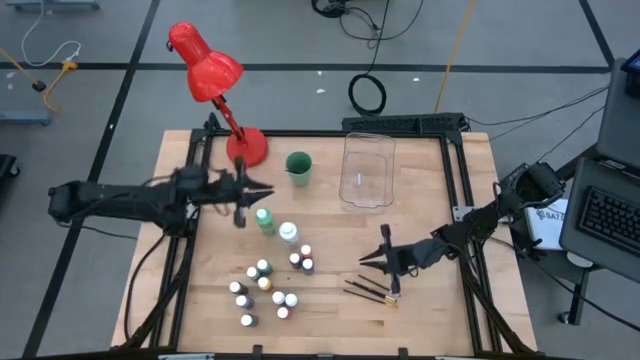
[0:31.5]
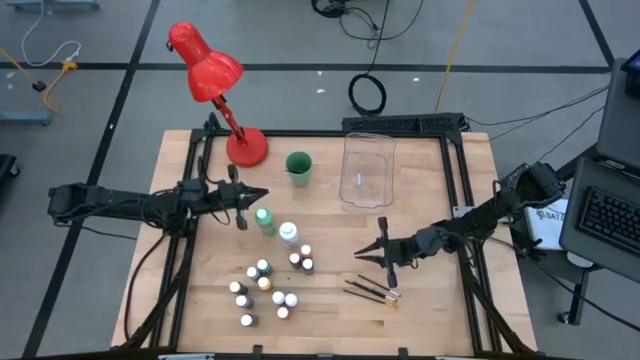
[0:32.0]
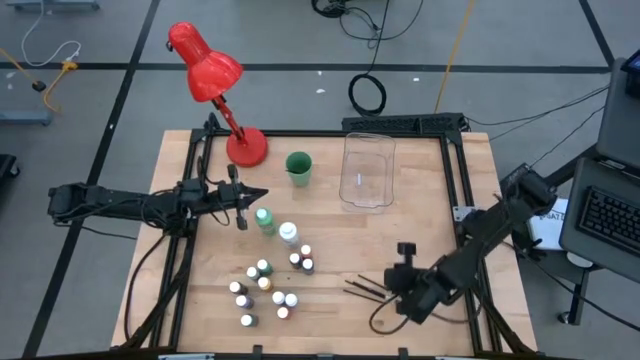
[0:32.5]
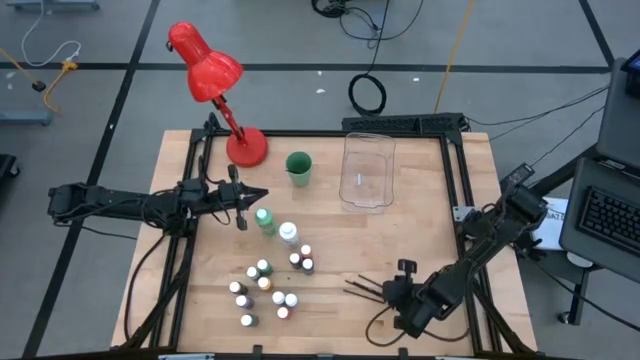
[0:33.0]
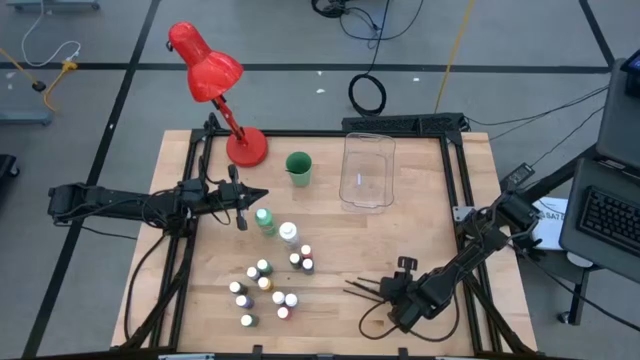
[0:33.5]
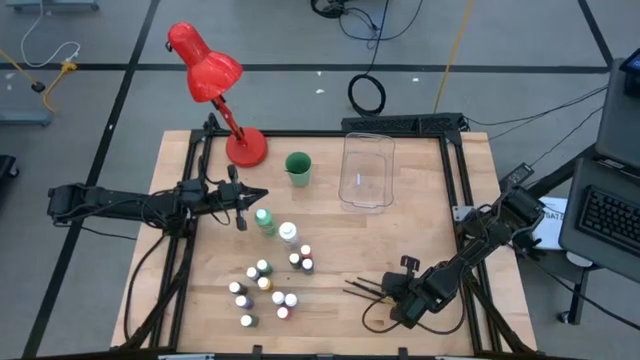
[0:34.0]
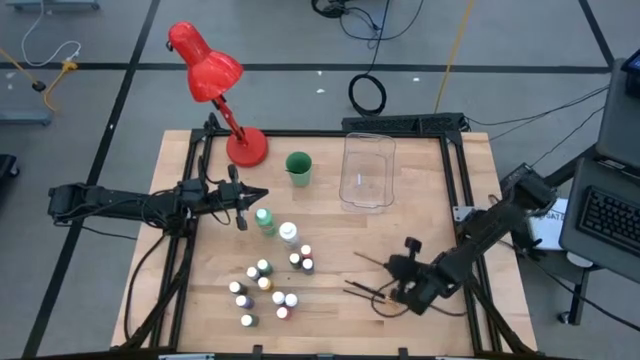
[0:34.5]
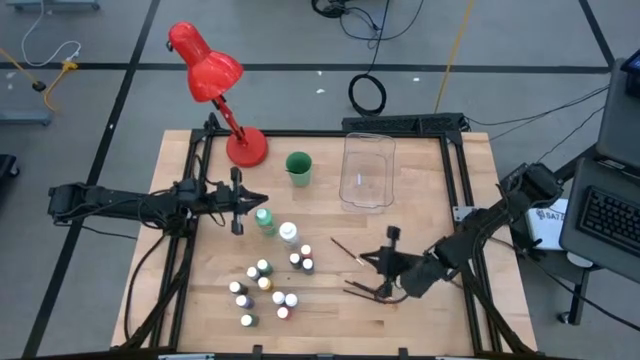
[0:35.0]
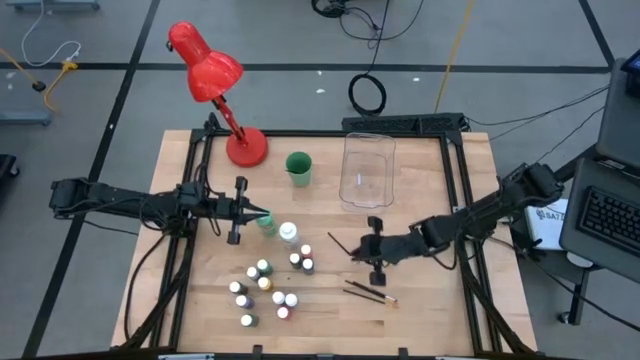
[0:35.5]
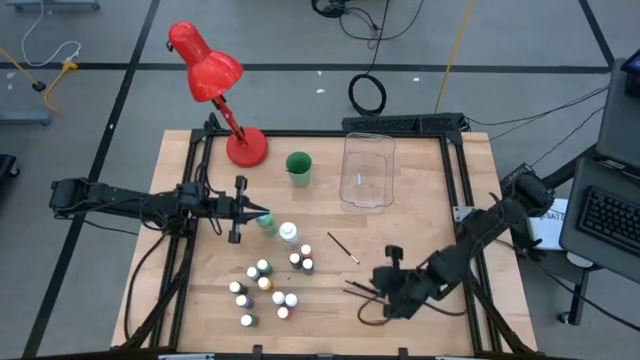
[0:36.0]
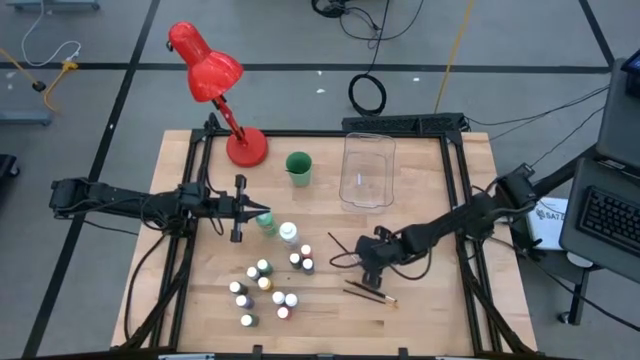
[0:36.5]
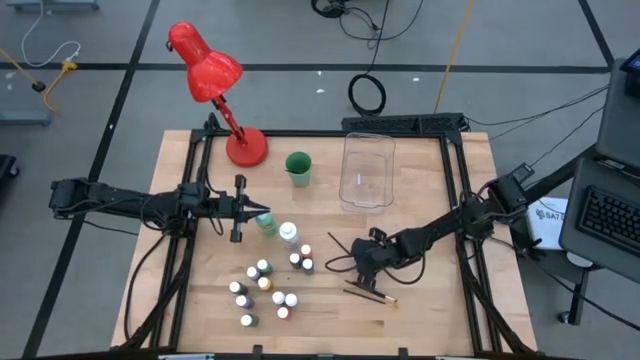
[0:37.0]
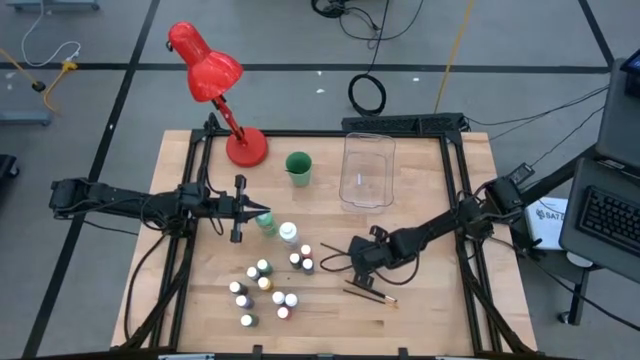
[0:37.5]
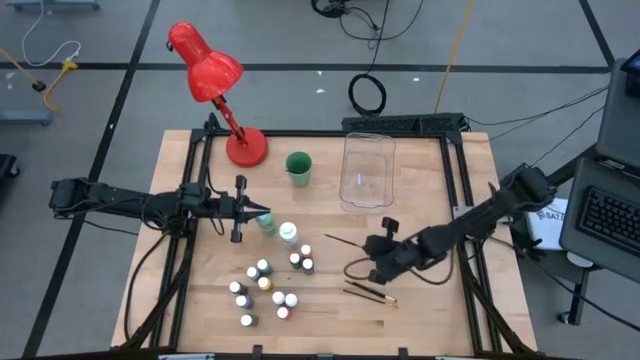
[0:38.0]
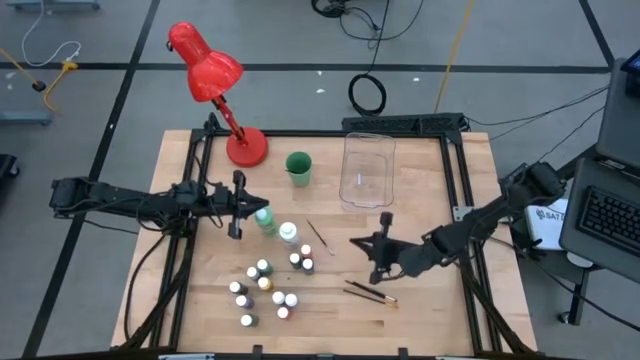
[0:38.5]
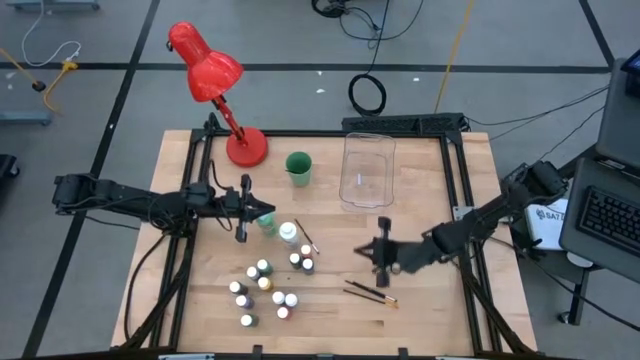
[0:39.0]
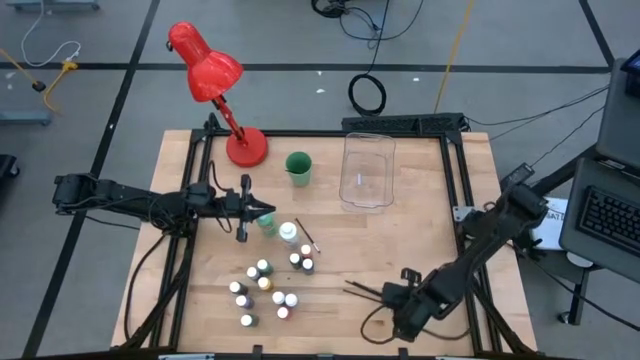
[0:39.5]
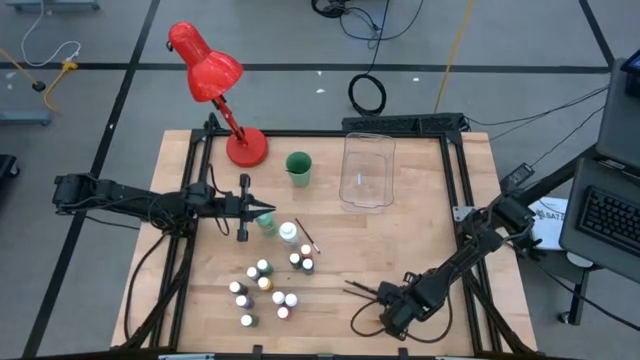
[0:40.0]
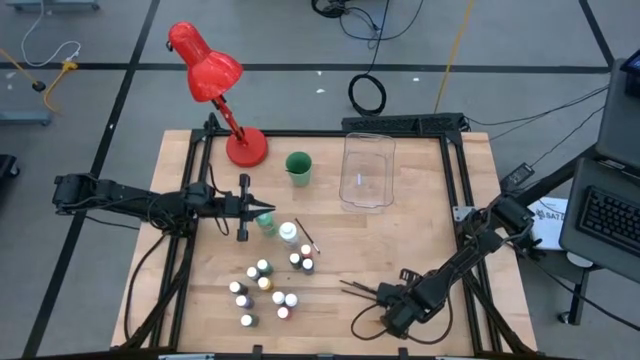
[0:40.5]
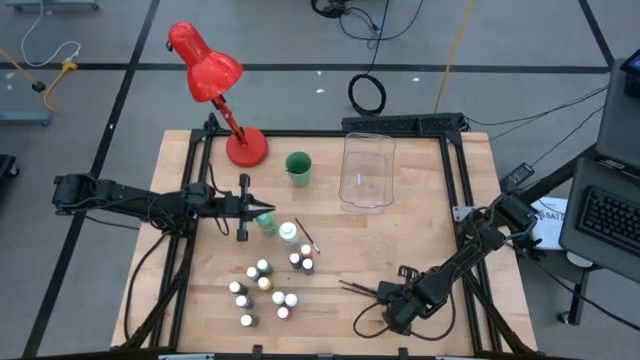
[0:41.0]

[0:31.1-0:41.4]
Task: Pick & Place Paint Supplies
Put the silver paintbrush into the green cup

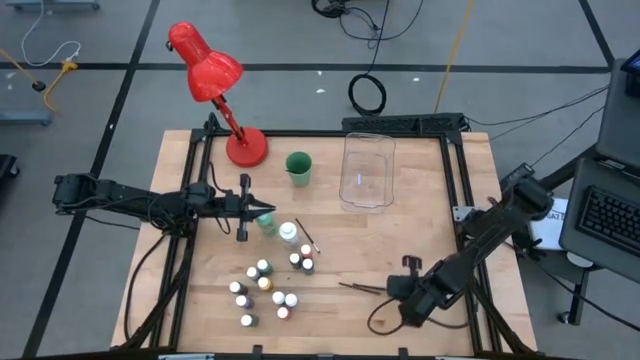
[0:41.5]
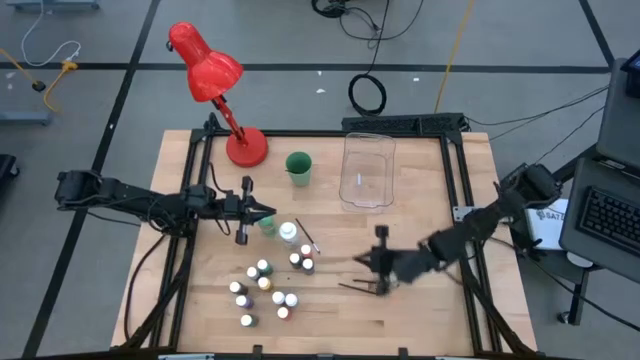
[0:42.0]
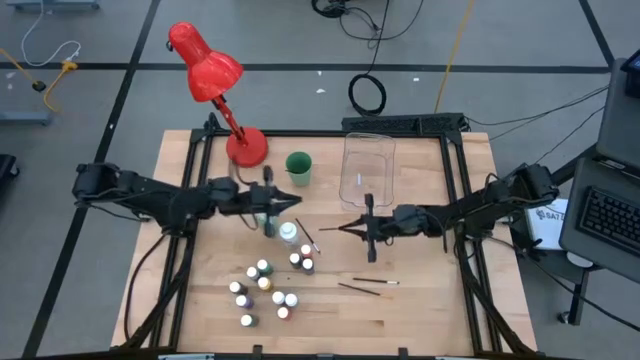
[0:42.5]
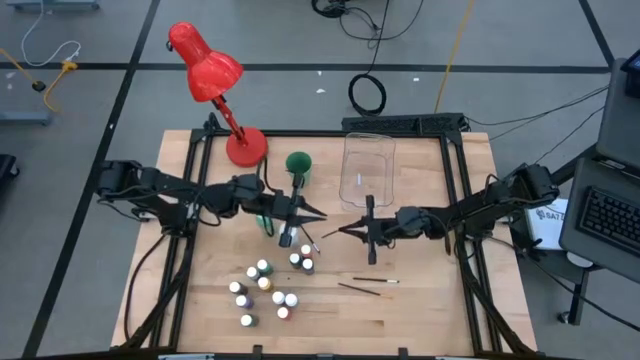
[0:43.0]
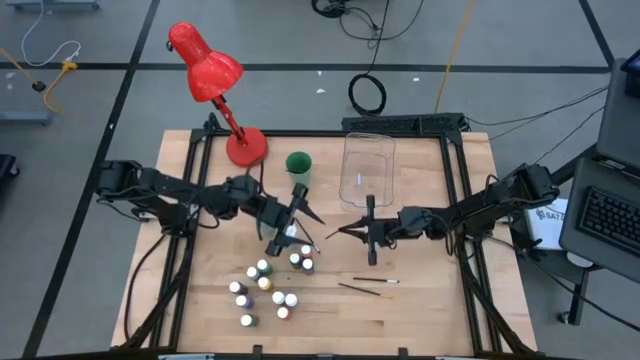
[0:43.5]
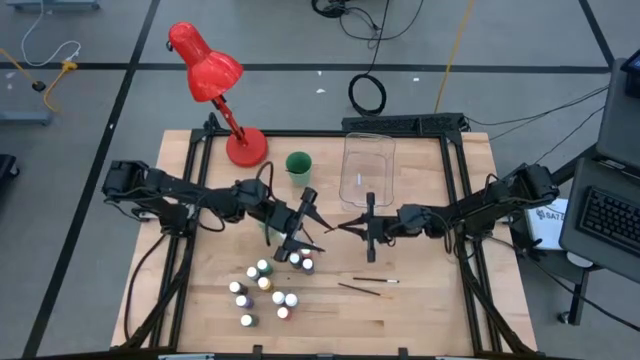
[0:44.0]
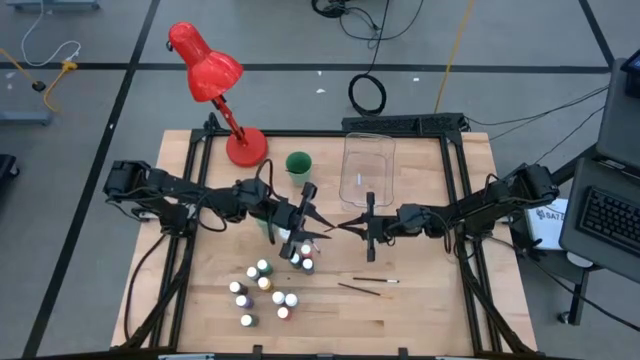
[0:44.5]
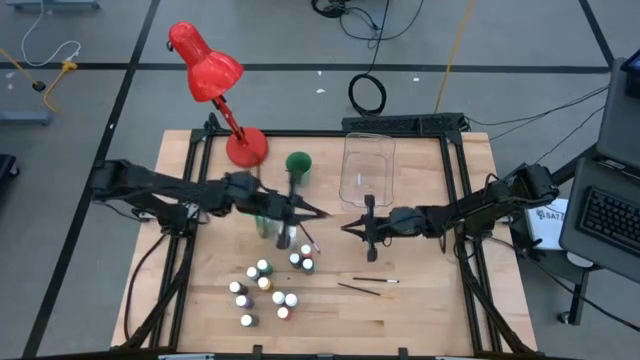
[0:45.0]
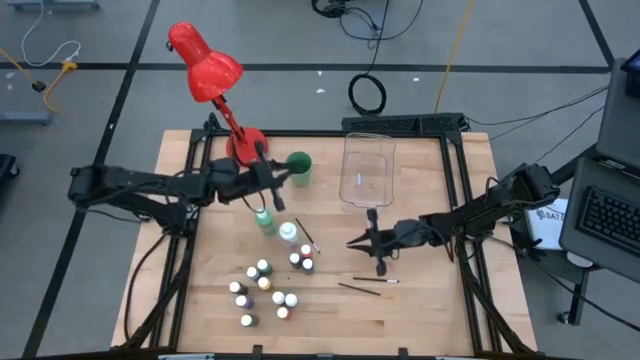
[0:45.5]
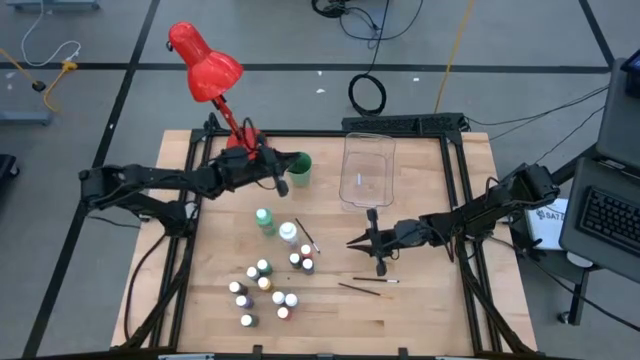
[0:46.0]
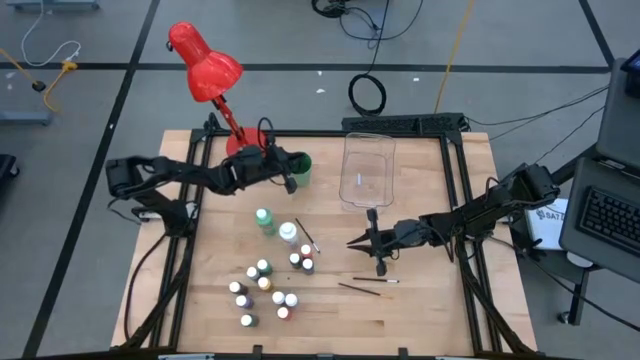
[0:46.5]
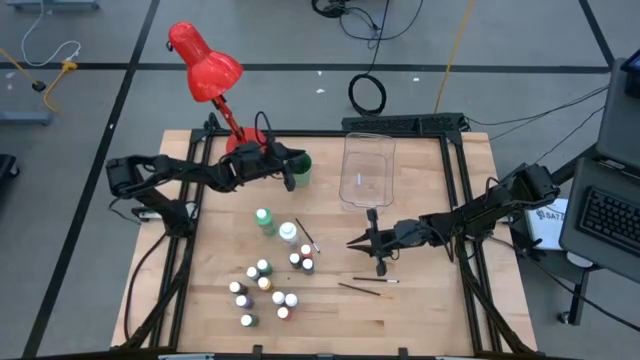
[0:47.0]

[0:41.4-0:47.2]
Put the gold paintbrush into the green cup

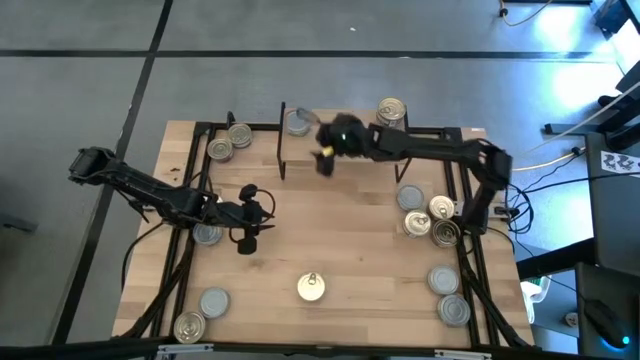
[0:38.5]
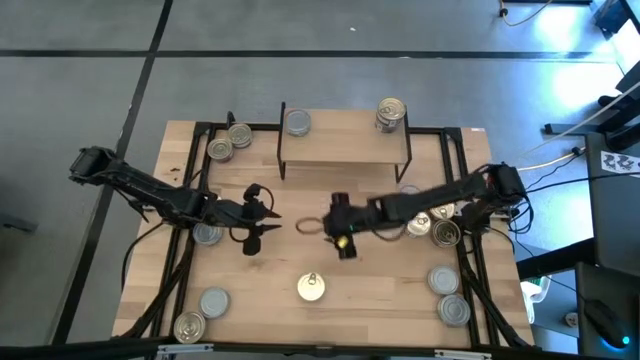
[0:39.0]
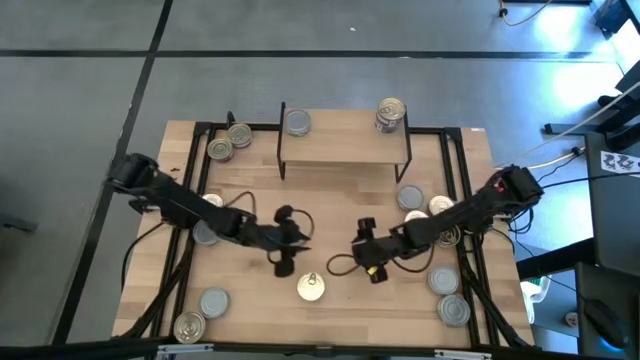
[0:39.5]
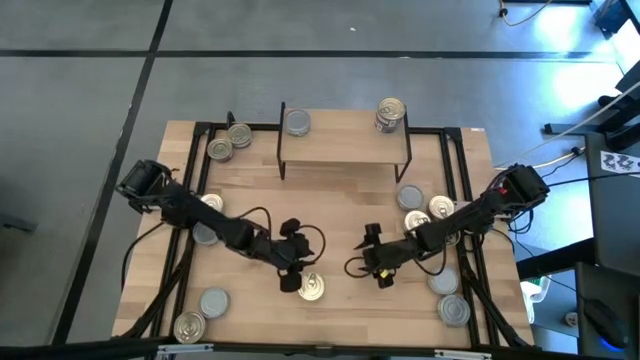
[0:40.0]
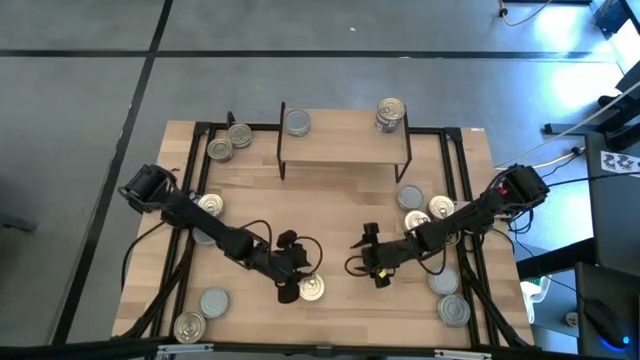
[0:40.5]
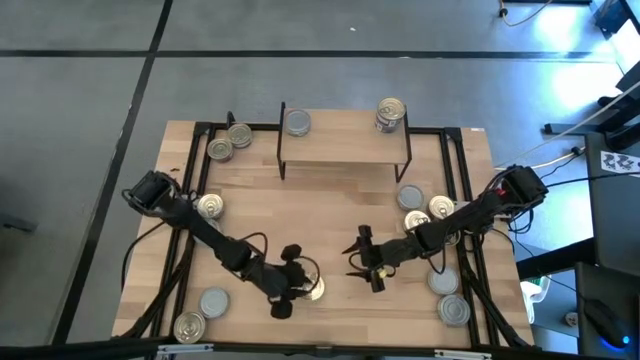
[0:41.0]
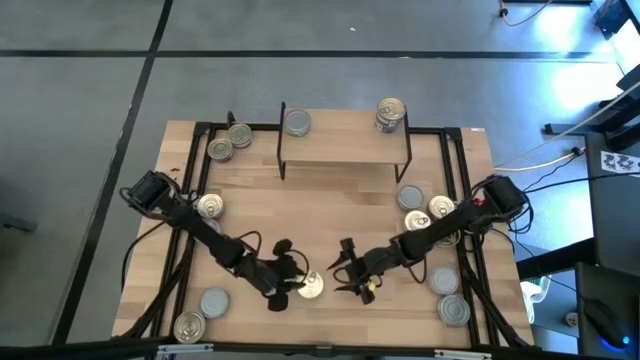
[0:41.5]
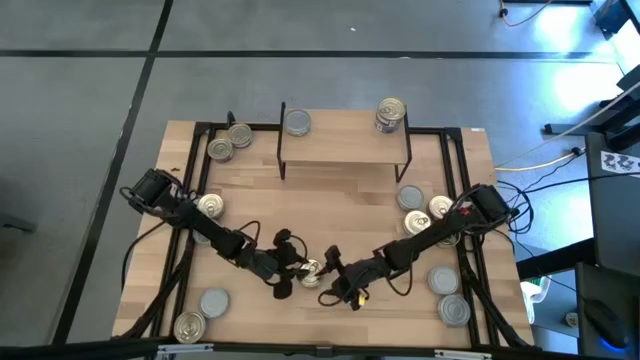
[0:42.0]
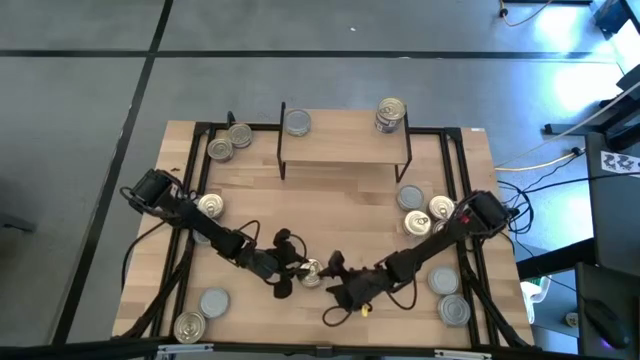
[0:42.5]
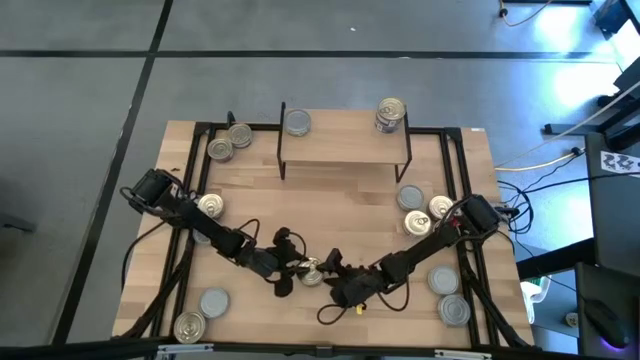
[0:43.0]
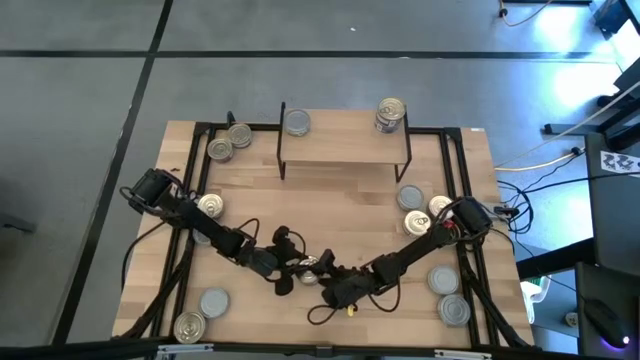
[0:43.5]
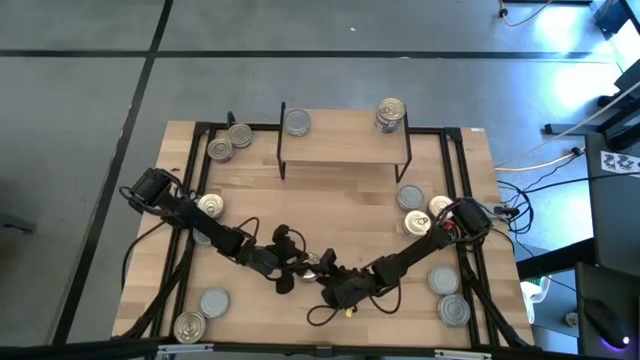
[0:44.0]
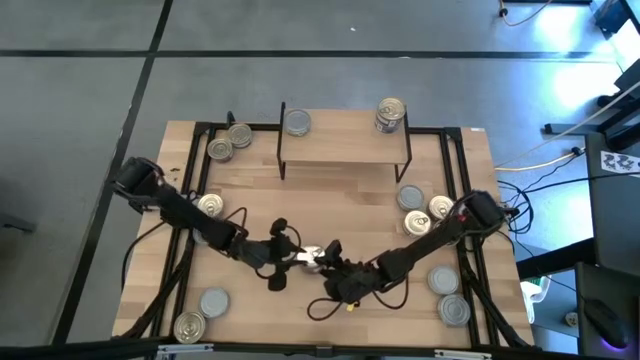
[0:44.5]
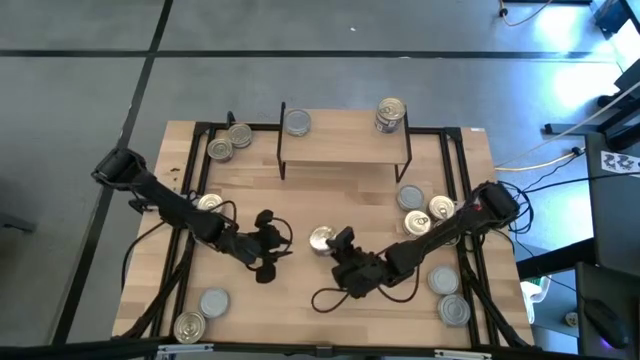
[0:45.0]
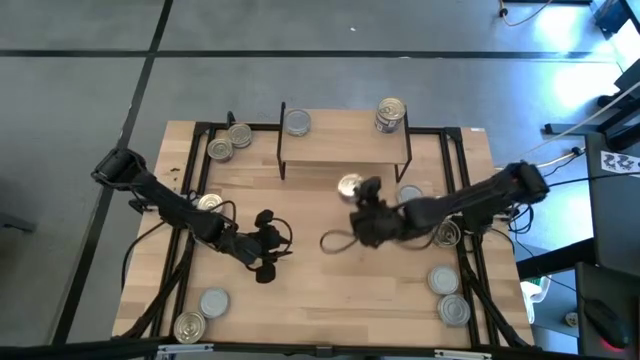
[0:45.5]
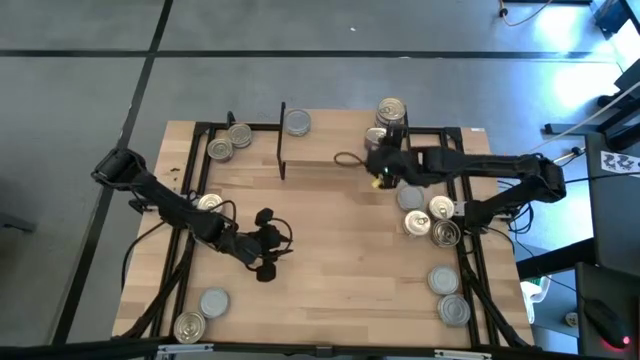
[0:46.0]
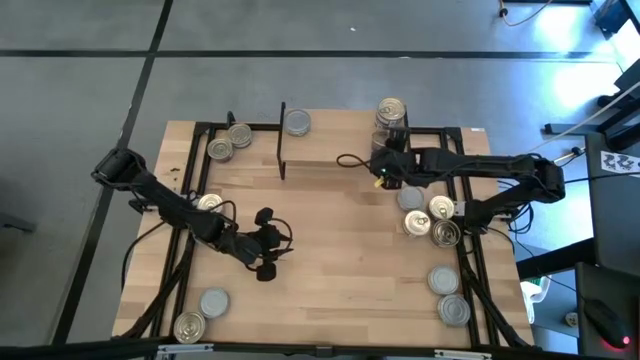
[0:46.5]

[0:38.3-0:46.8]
Task: Stack canned seafood by type on shelf
Put the blue pink tuna can on the shelf
